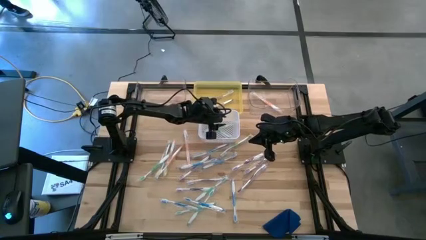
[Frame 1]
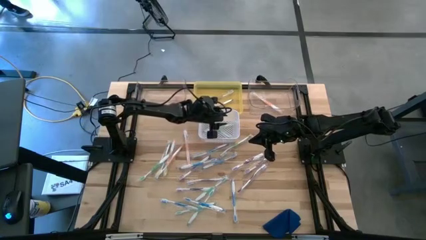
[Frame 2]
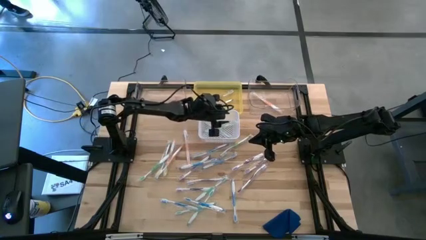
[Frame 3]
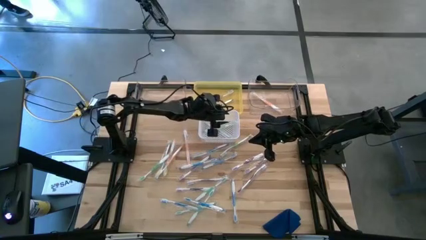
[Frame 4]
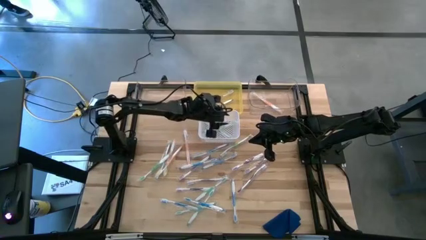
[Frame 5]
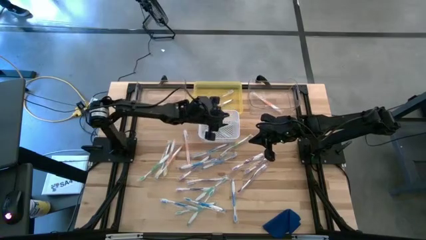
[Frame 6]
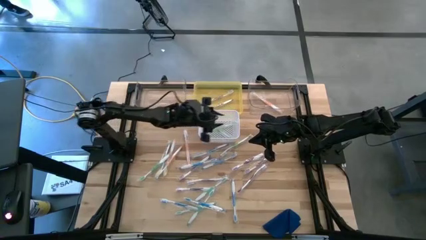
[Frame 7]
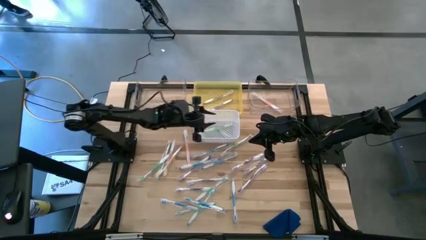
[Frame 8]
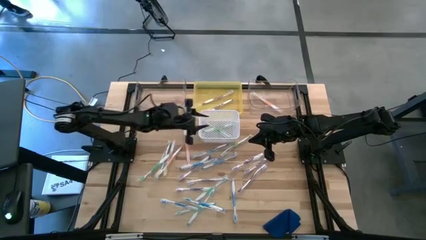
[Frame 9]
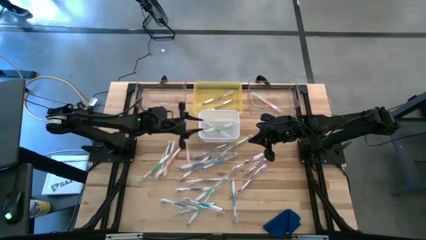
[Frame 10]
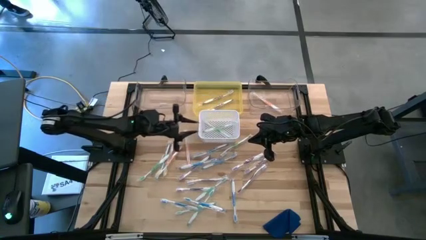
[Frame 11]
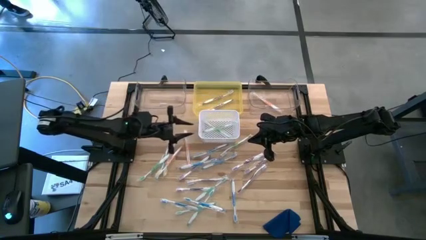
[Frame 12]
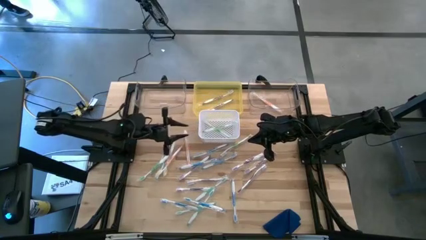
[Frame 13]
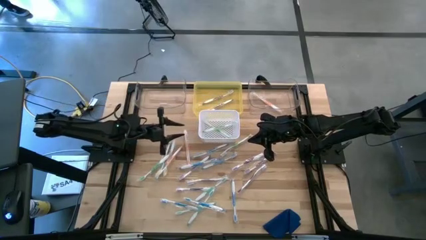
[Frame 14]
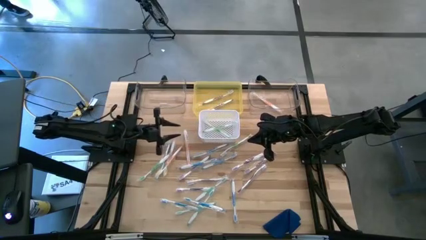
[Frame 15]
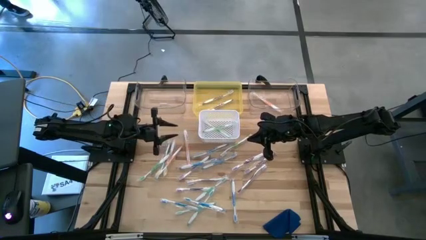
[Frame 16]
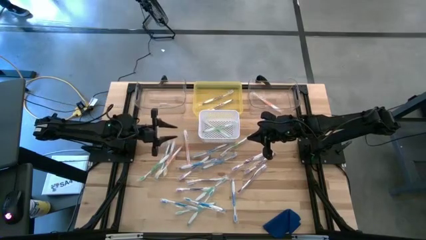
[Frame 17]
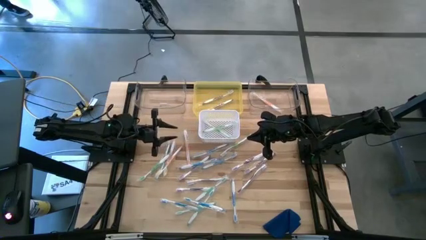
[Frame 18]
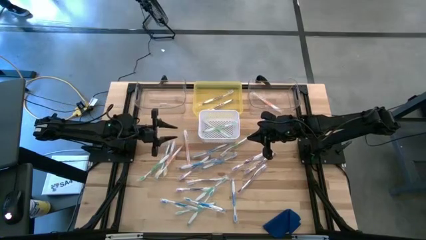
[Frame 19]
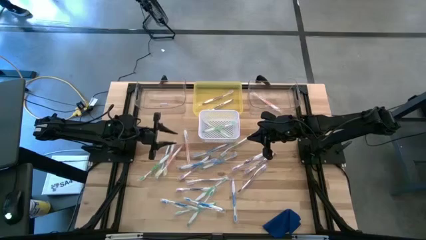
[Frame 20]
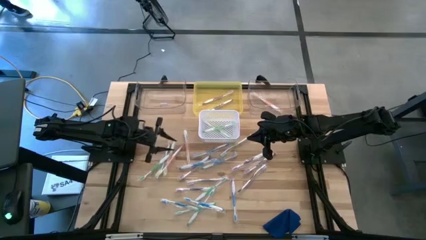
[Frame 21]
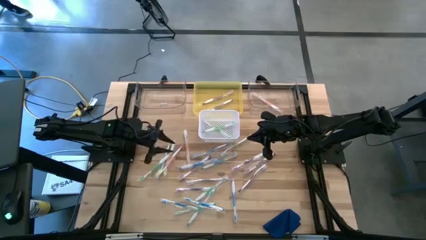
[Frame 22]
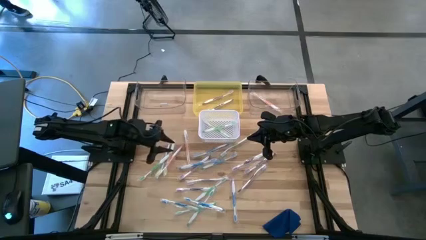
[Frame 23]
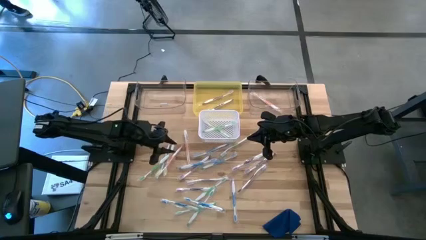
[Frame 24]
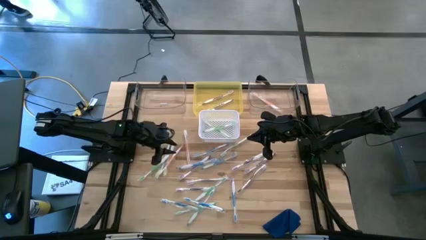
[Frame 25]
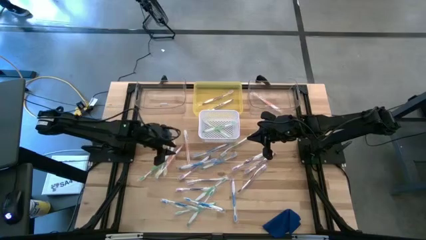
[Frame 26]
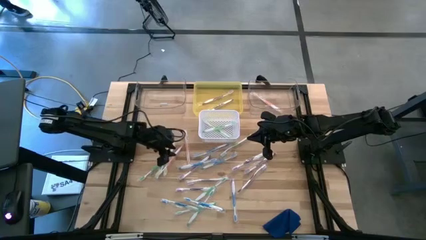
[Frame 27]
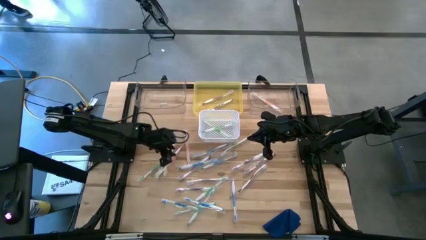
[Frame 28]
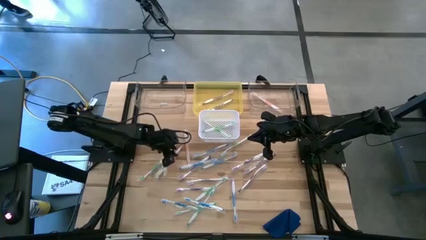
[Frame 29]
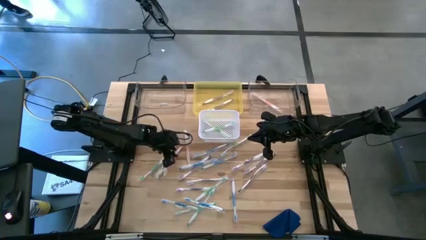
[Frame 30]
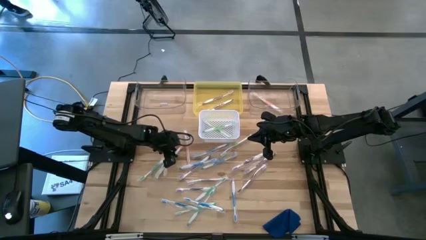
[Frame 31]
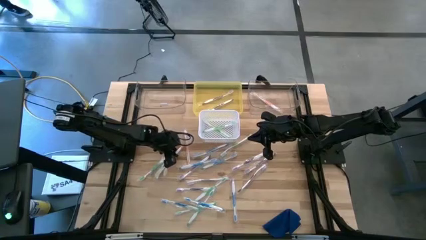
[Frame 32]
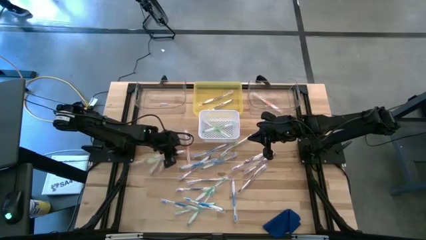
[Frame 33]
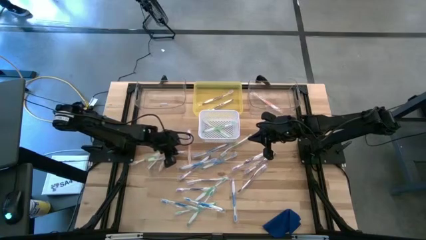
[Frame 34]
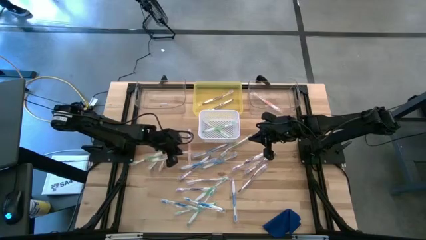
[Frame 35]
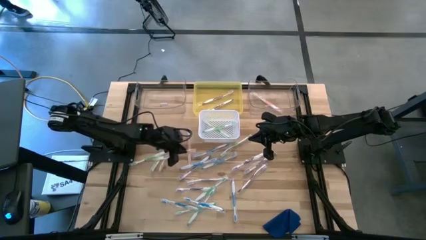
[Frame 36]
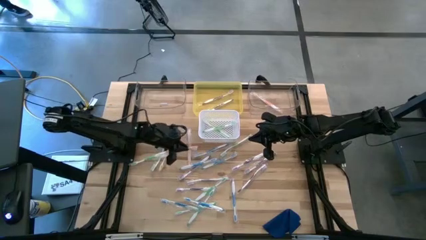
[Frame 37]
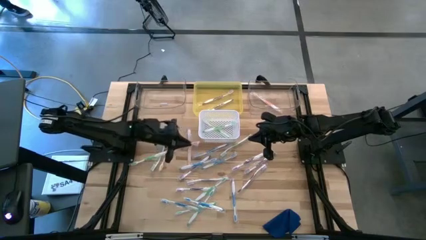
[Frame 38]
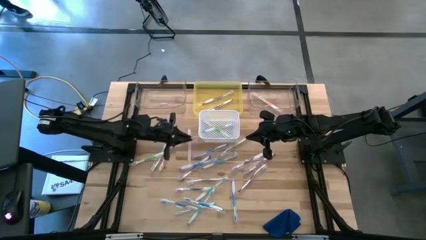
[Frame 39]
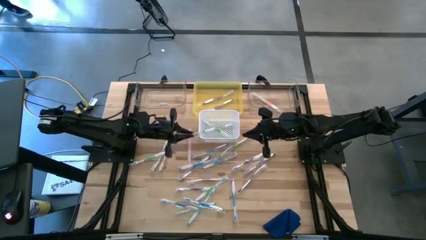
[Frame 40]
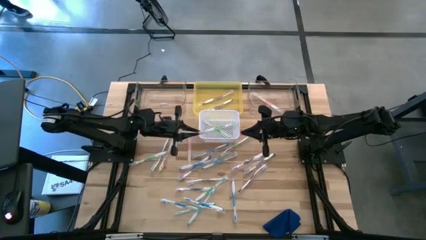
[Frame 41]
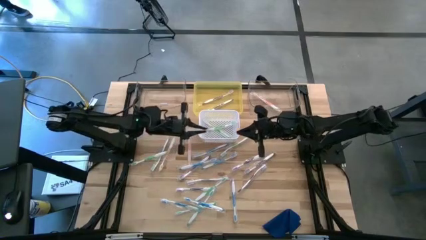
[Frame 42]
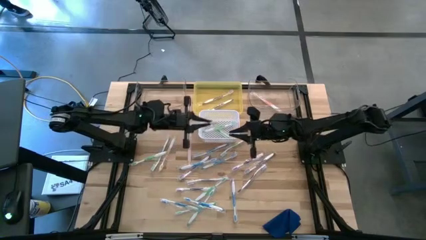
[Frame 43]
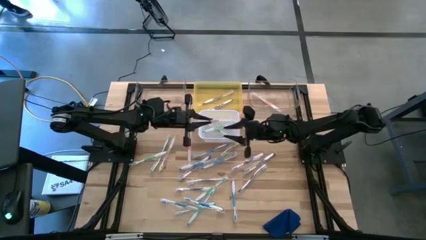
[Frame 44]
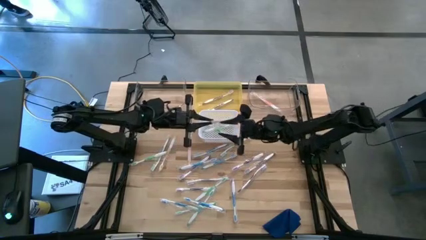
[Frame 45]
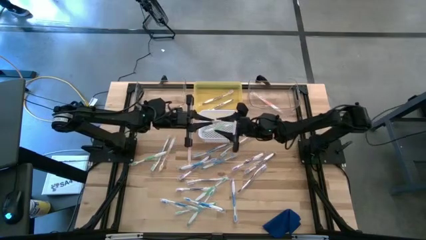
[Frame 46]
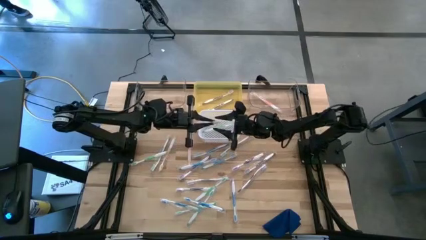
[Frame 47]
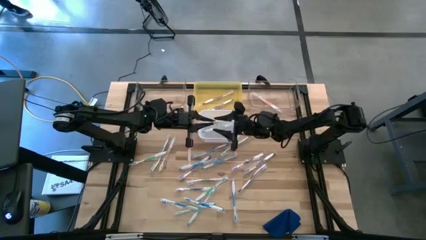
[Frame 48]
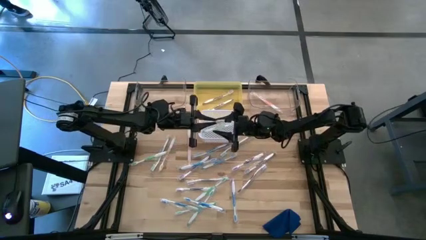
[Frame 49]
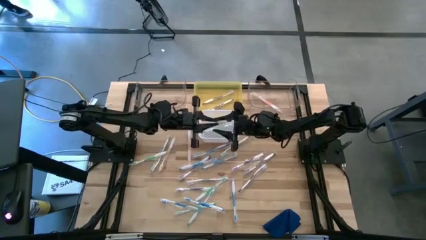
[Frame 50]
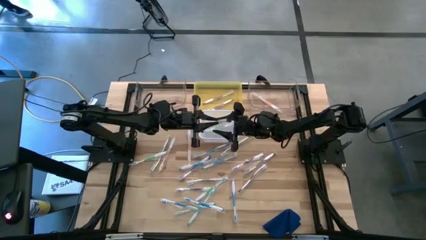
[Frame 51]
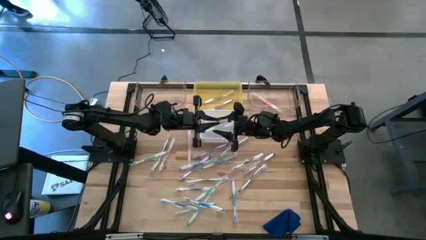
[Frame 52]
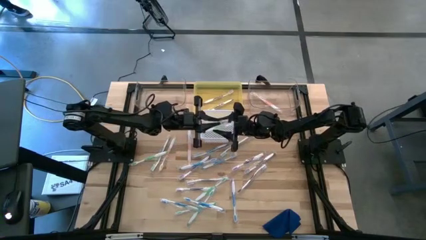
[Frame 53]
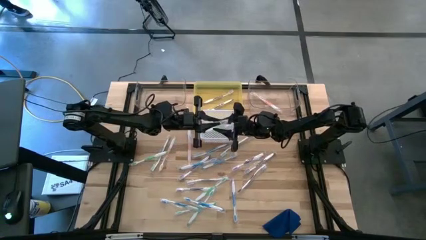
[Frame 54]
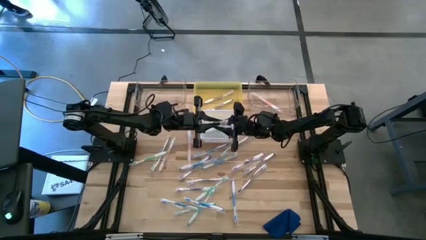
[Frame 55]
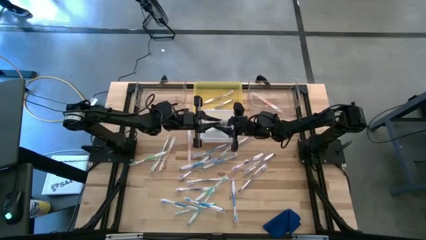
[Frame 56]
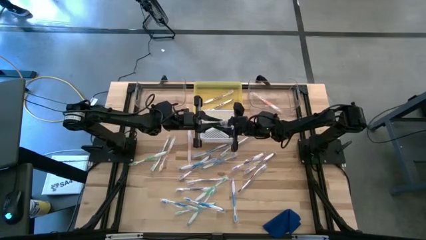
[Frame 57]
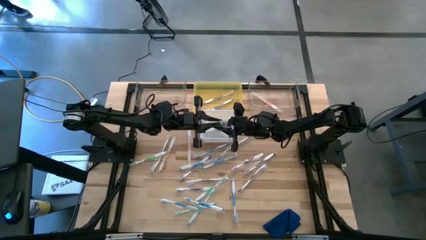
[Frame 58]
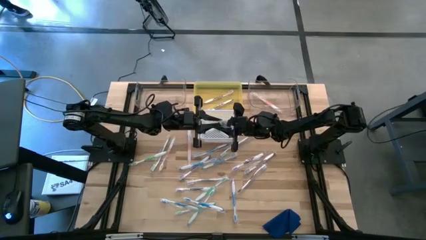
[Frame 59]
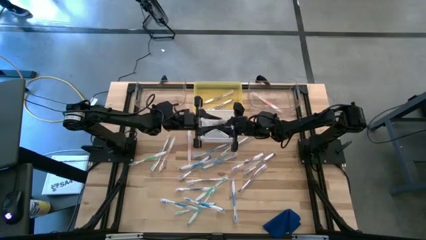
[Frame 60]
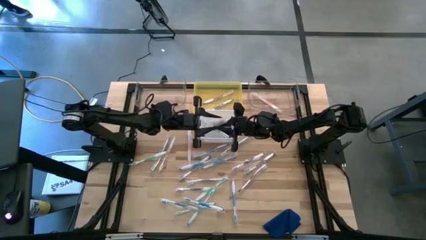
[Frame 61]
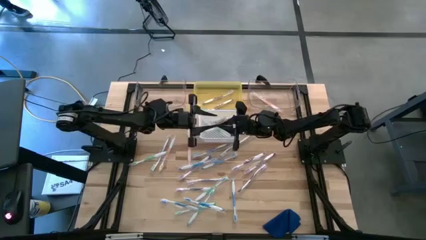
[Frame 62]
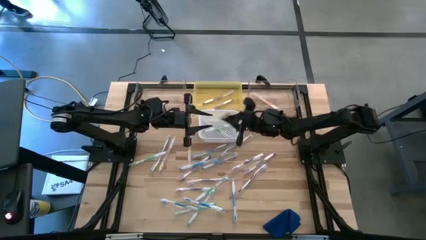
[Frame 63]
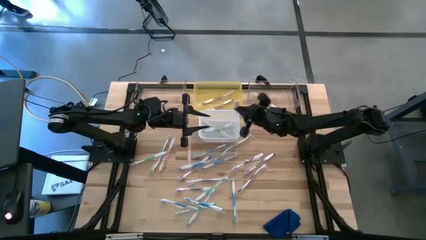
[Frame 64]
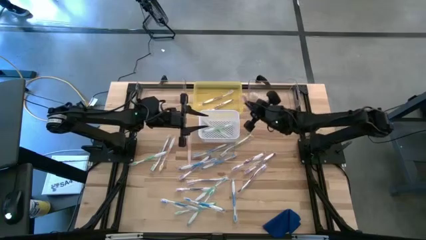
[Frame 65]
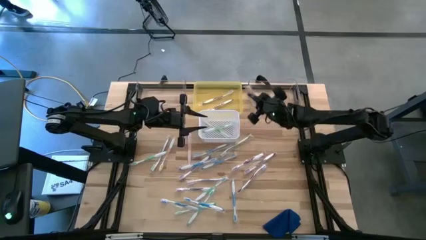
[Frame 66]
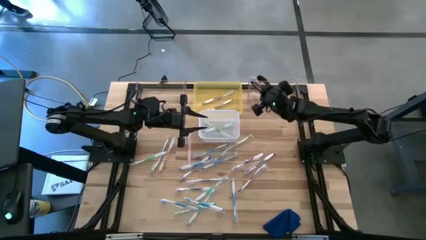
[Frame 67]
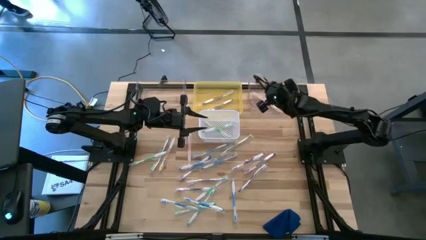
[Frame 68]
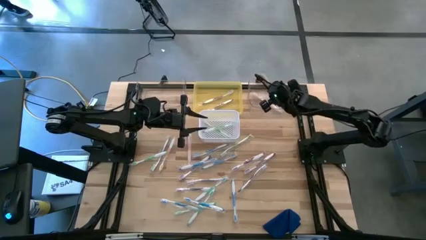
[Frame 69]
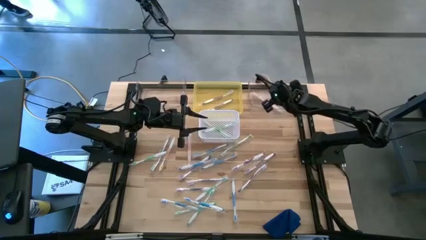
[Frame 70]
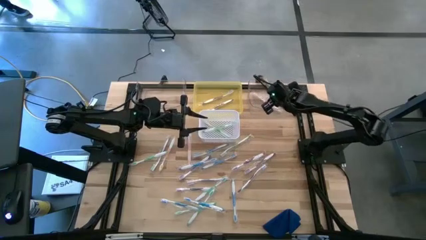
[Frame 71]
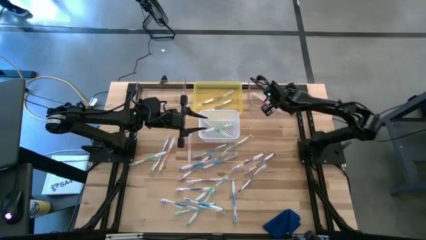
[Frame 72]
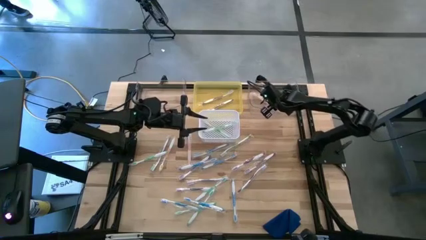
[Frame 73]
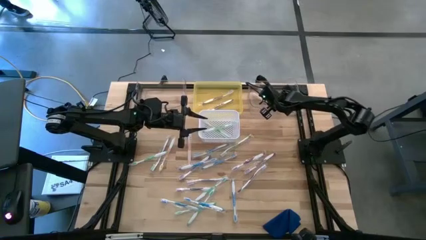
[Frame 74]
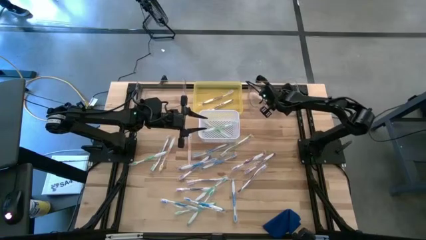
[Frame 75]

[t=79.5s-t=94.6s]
Task: Pick & Place Toothbrushes
Put the orange toothbrush into the right transparent bin
